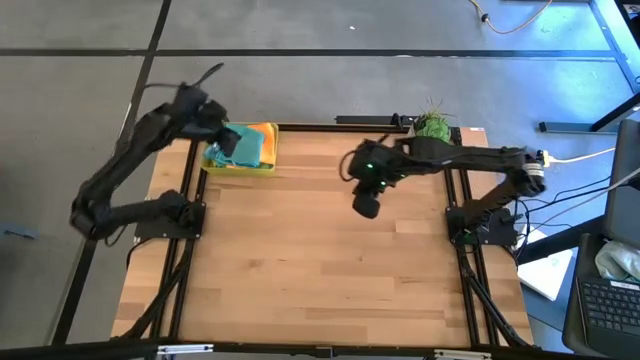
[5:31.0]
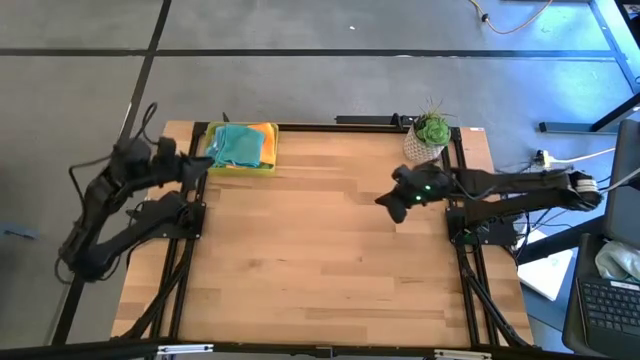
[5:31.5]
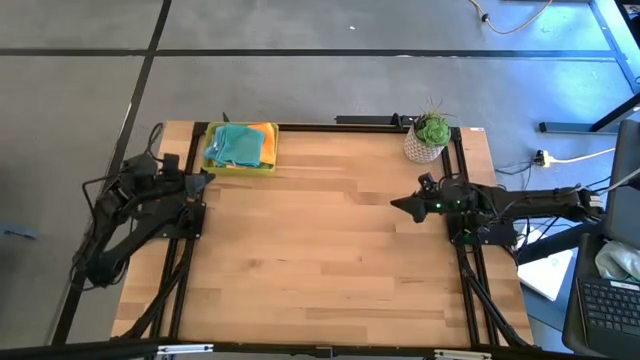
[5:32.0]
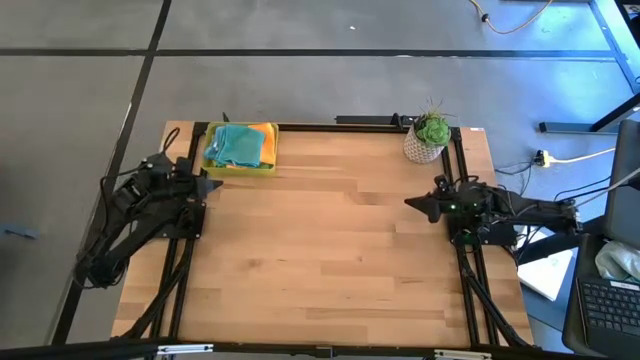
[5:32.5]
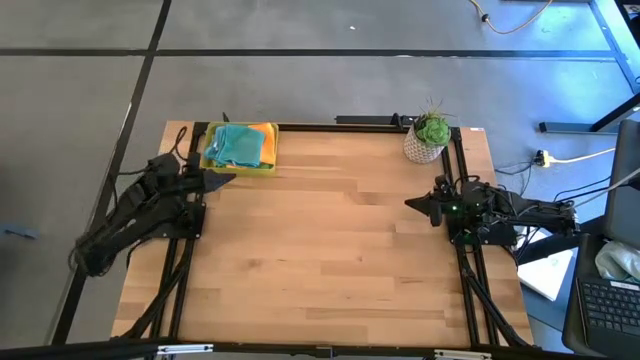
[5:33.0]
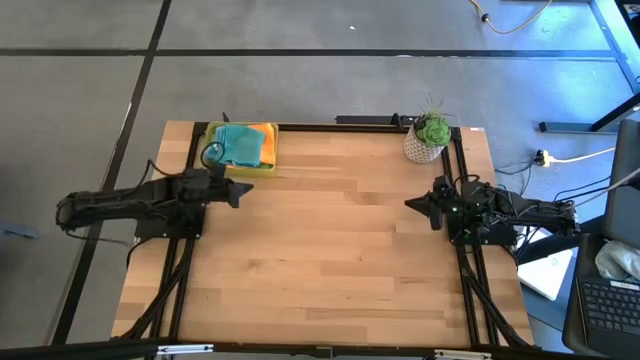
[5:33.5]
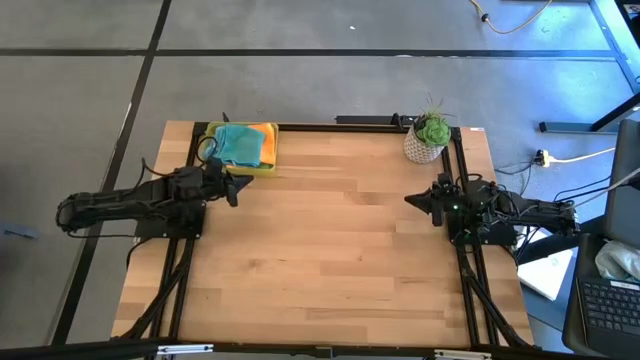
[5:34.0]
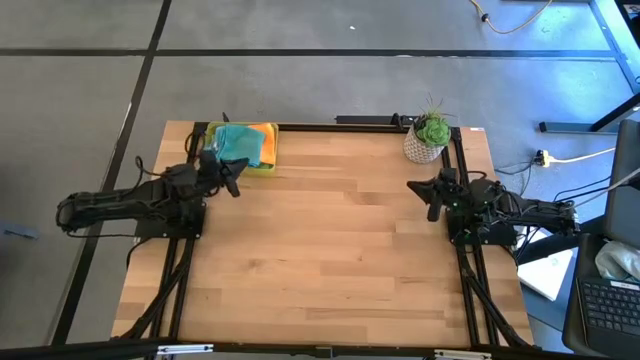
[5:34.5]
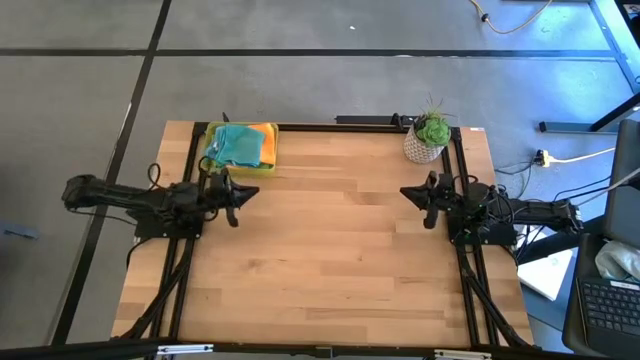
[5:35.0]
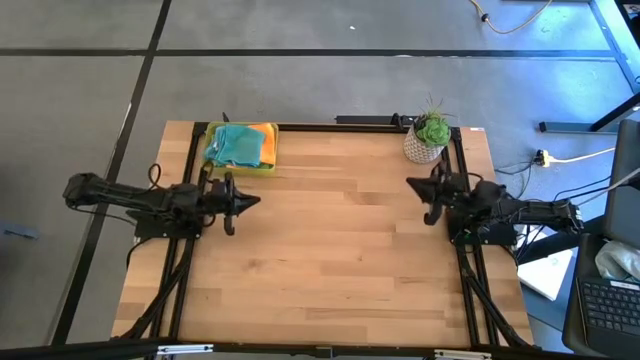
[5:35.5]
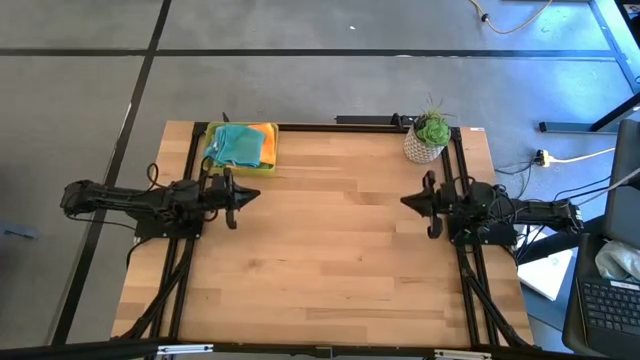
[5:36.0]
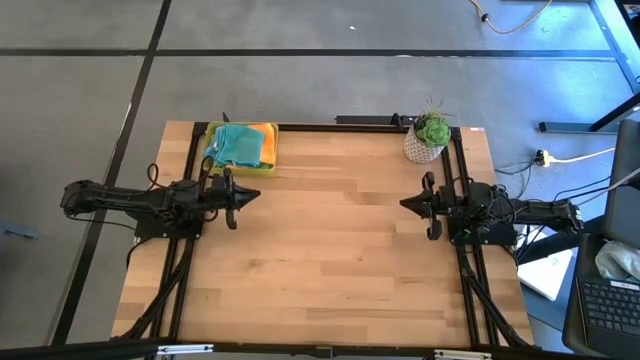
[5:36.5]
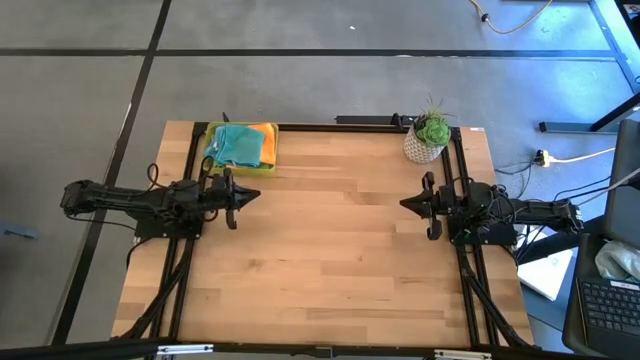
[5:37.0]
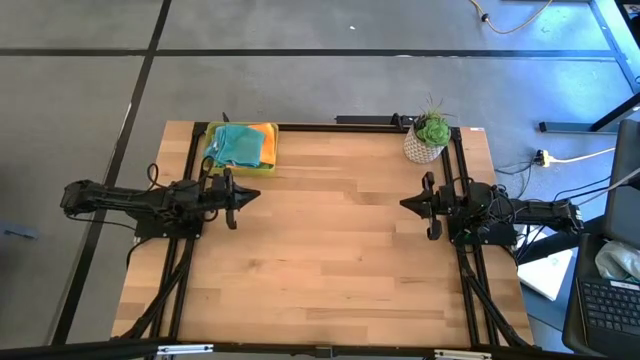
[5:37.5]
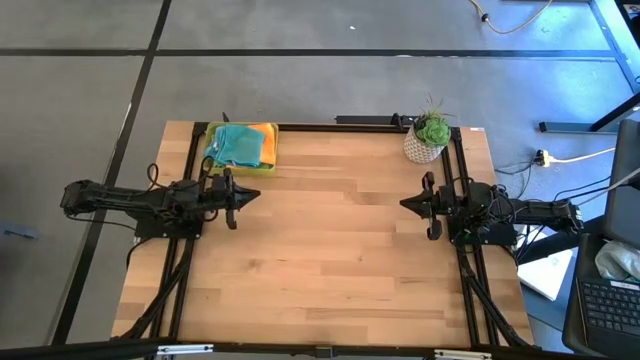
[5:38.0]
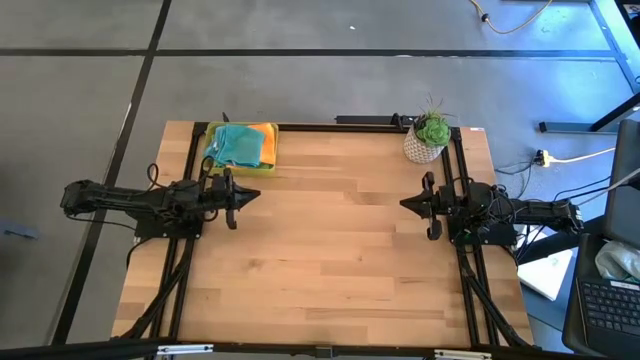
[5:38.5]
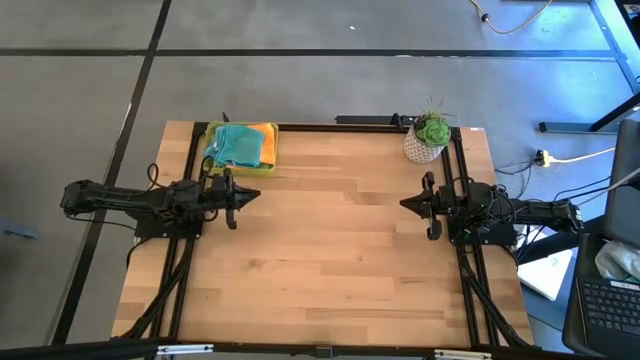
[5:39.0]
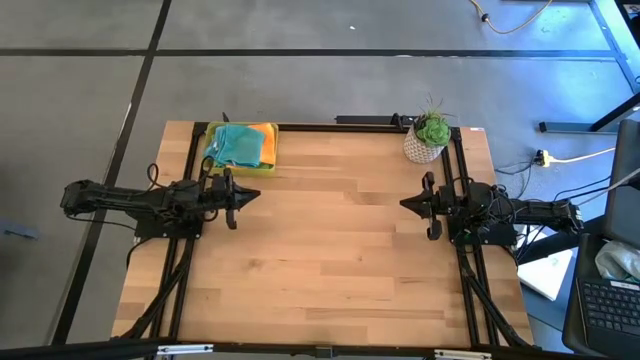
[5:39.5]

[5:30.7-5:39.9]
Task: Fold microfiber towels
Return to Home Position

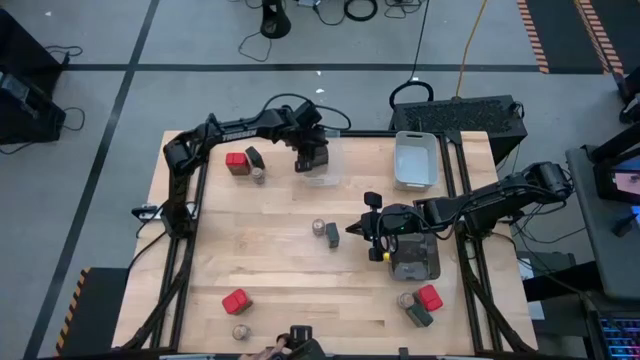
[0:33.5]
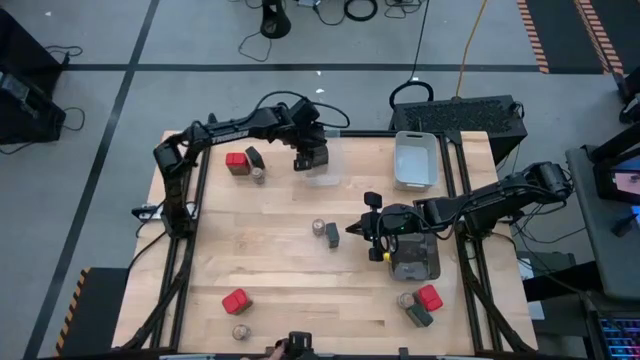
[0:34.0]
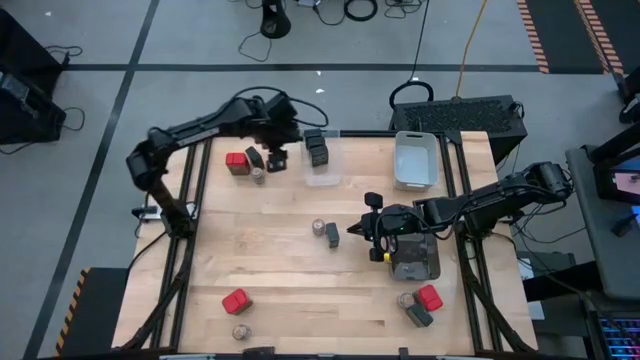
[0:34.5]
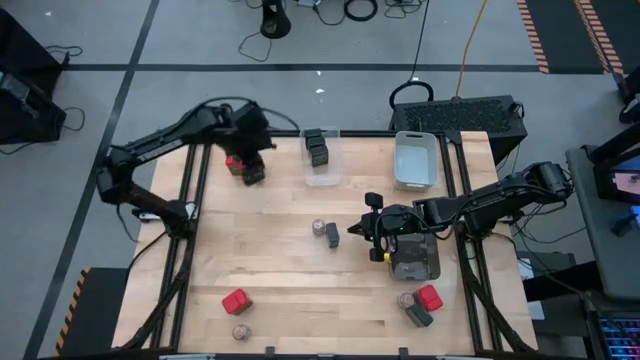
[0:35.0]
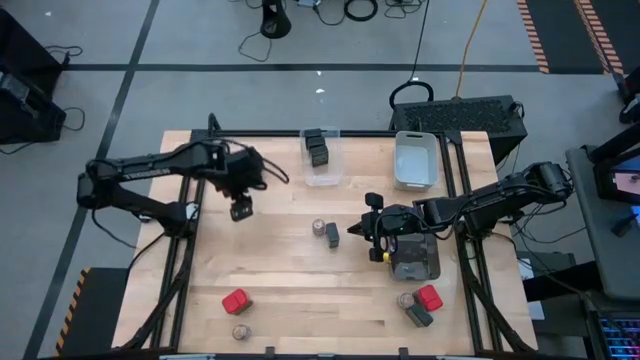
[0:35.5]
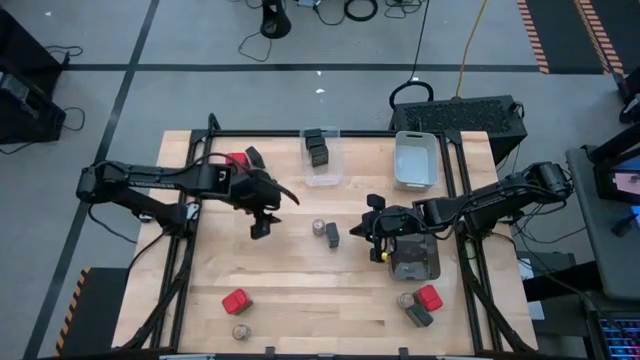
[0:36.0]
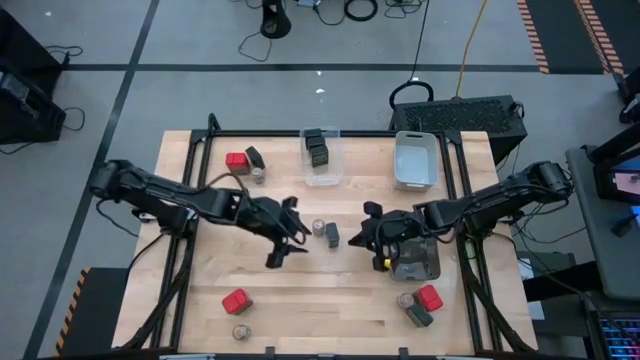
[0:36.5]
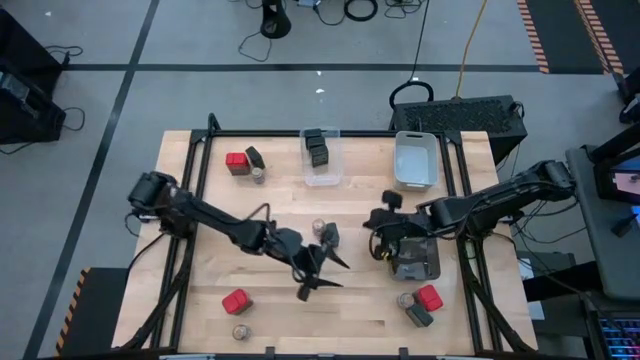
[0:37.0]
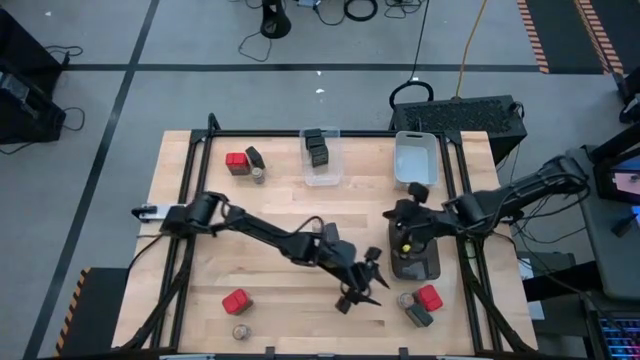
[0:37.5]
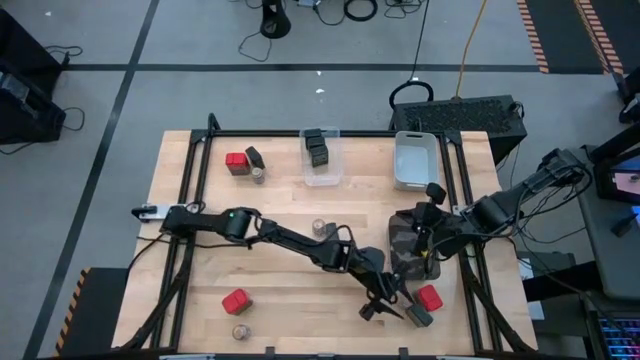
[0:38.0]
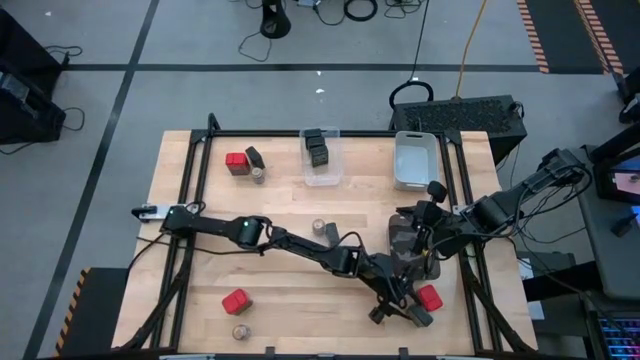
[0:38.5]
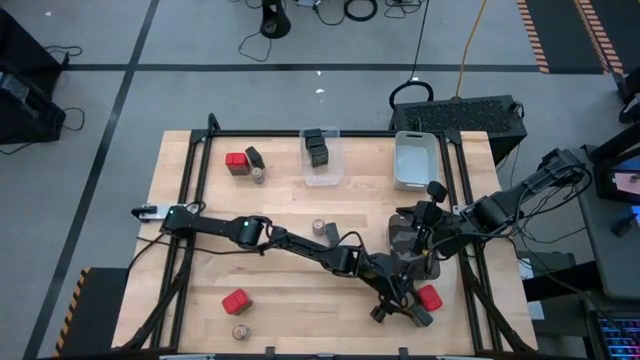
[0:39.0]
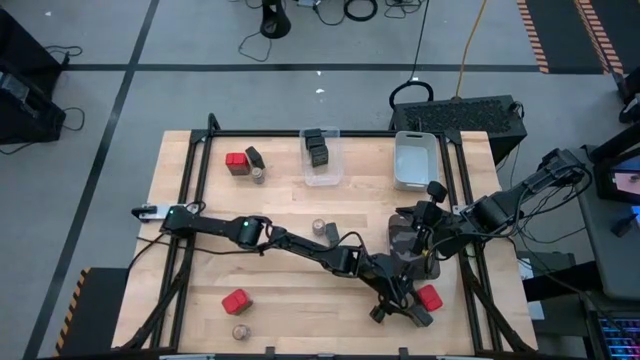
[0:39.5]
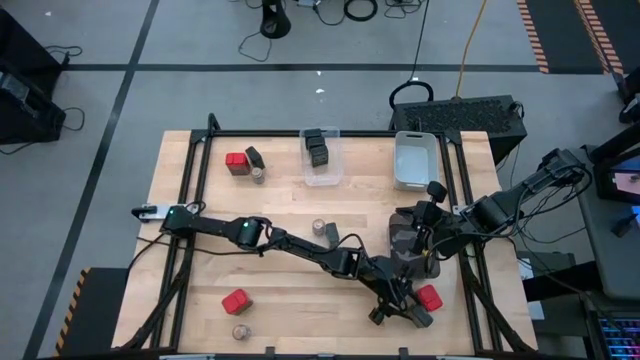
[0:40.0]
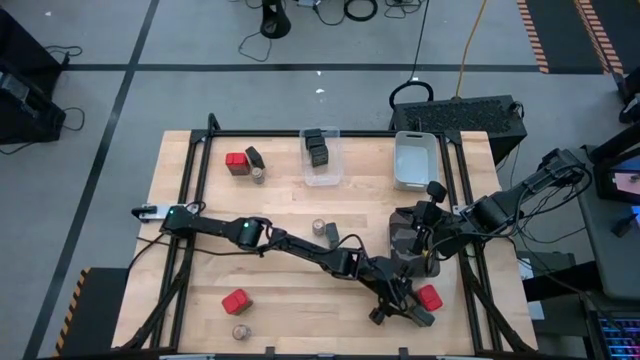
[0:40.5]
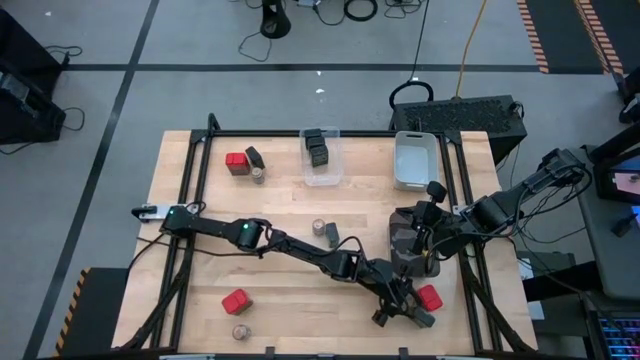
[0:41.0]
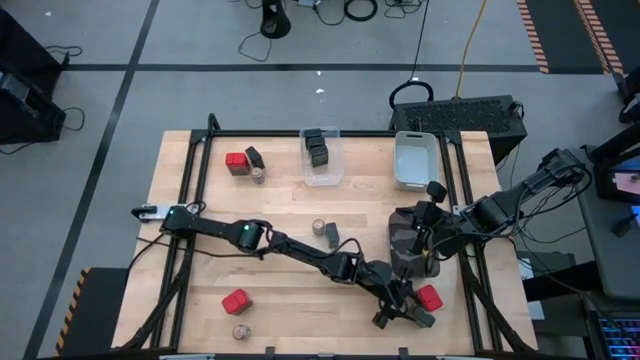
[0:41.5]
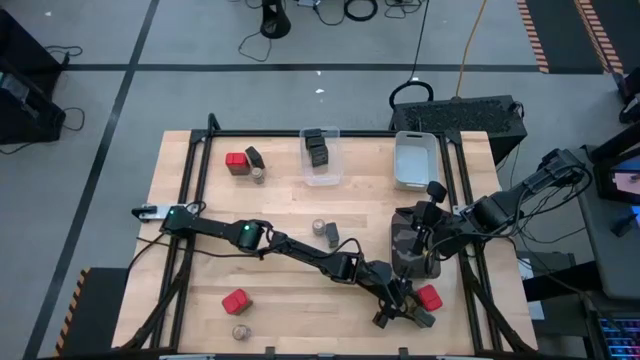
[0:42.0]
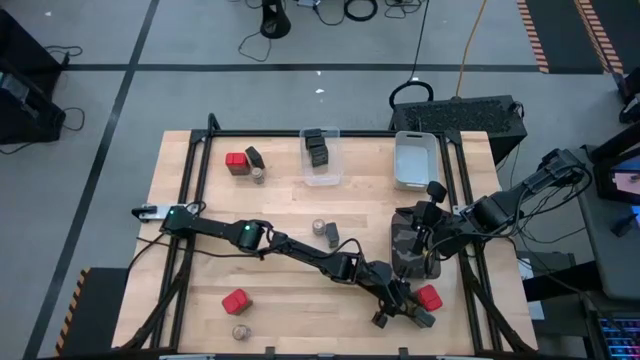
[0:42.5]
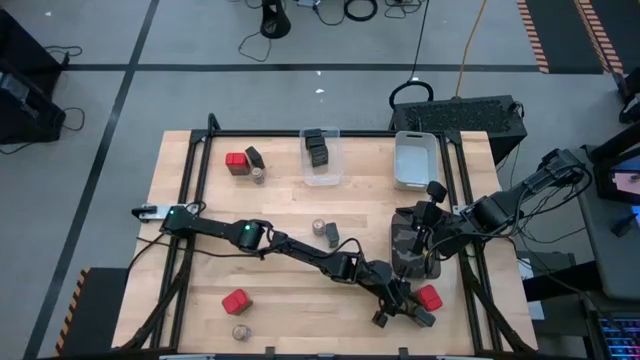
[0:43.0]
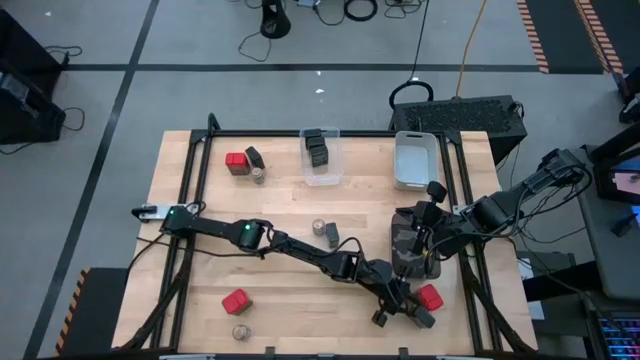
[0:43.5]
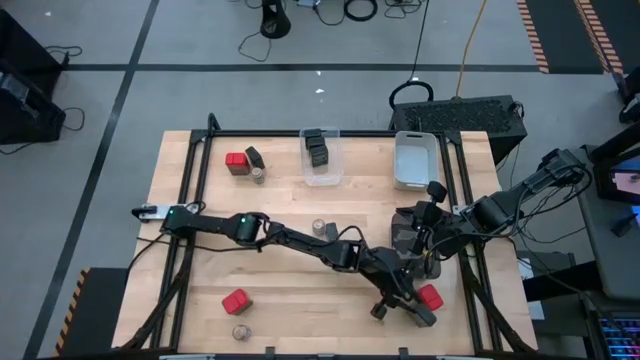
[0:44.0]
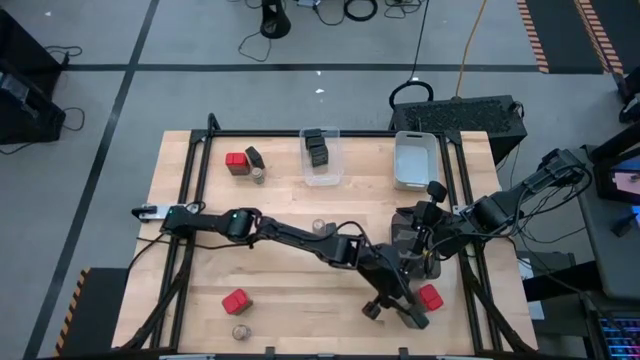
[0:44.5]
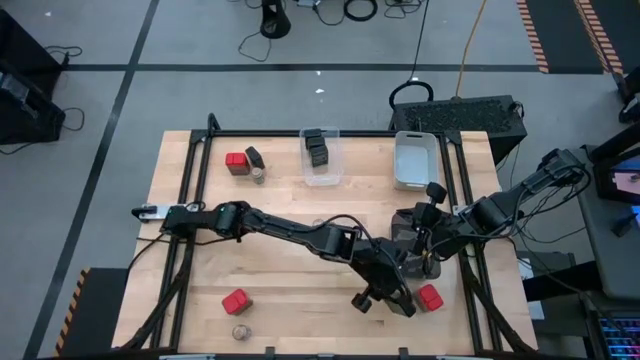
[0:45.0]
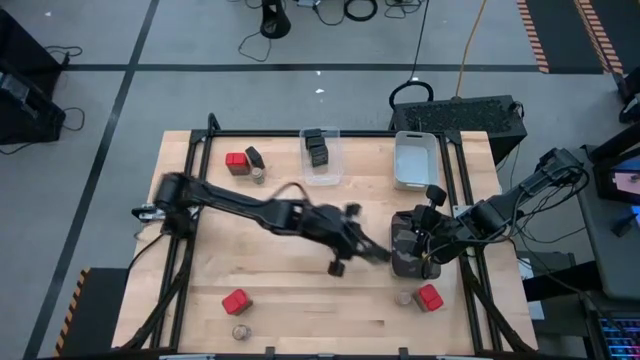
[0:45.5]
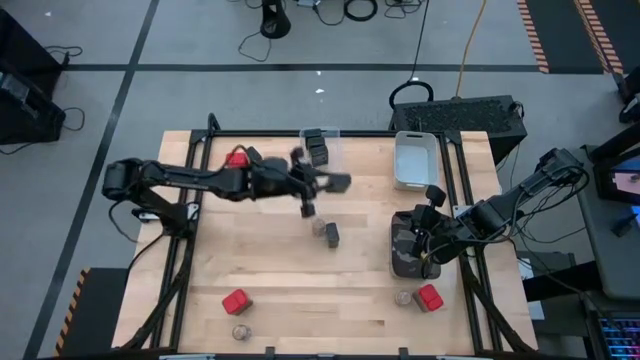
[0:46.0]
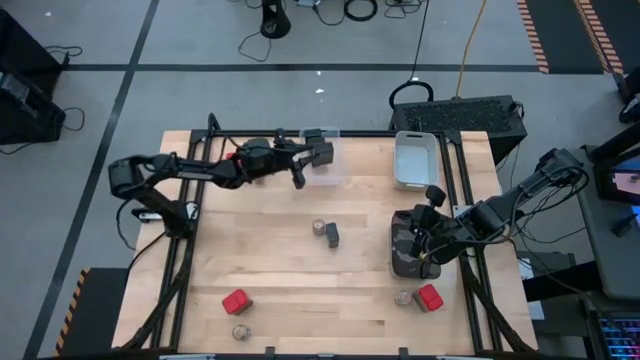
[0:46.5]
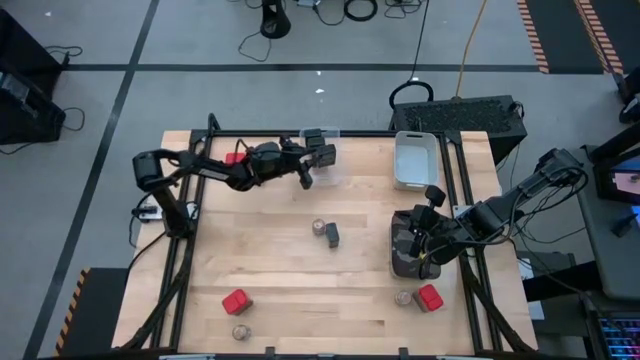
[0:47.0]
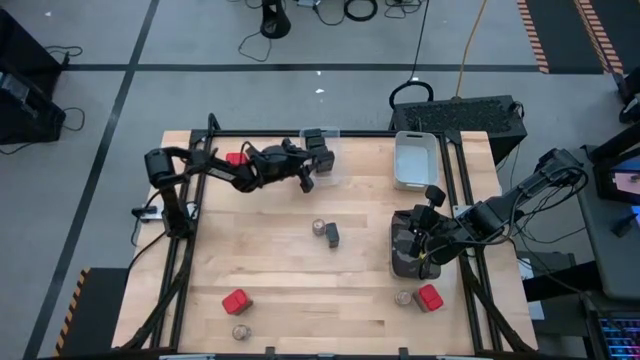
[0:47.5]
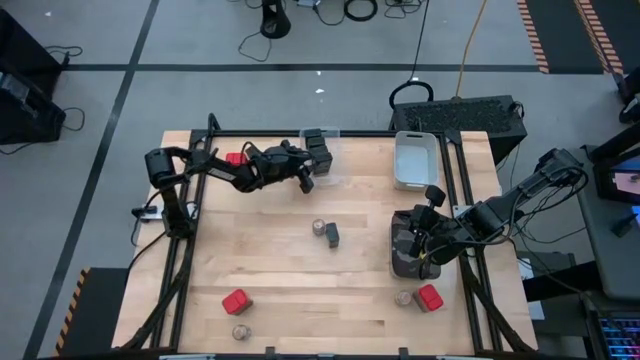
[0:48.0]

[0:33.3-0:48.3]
Task: Sort spices by type
Put the black seasoning can into the transparent bin
